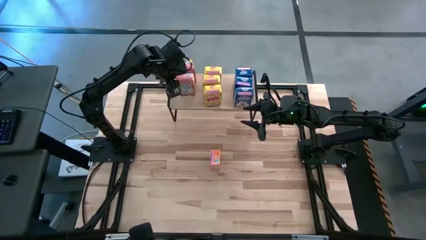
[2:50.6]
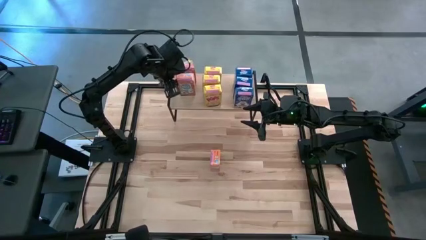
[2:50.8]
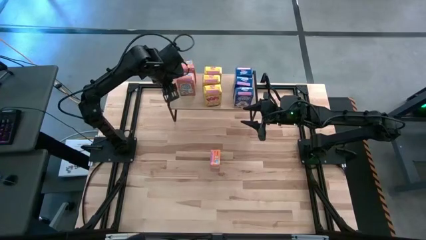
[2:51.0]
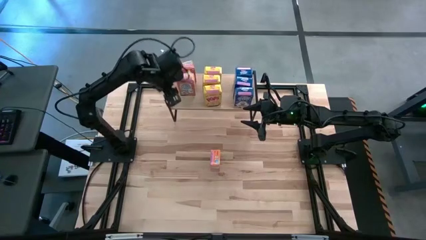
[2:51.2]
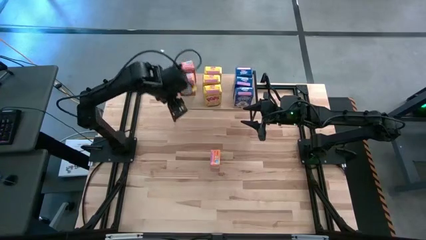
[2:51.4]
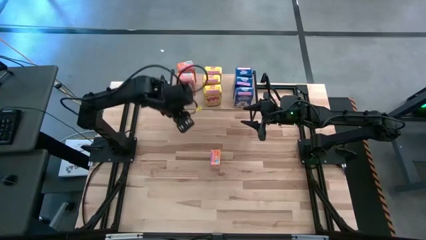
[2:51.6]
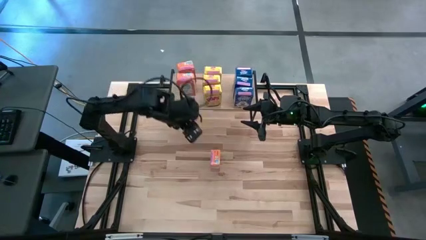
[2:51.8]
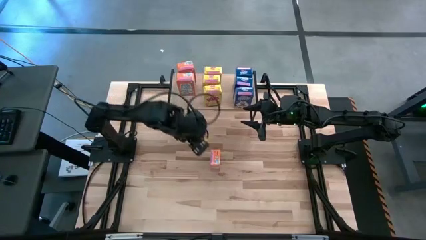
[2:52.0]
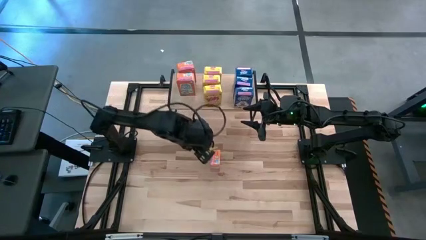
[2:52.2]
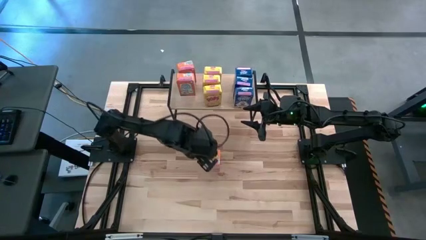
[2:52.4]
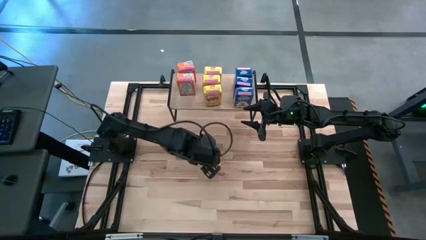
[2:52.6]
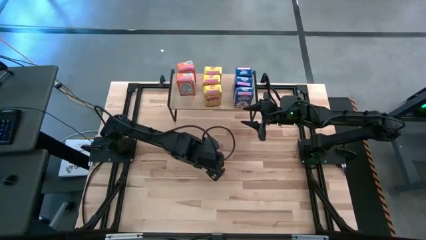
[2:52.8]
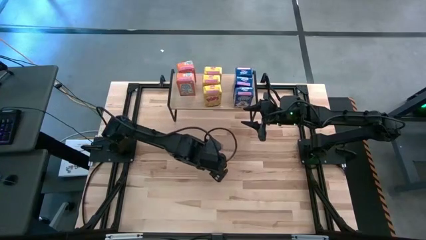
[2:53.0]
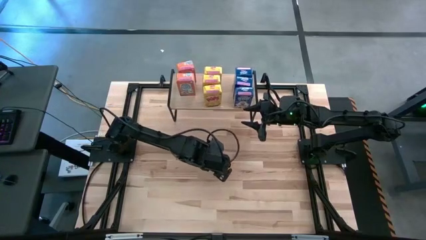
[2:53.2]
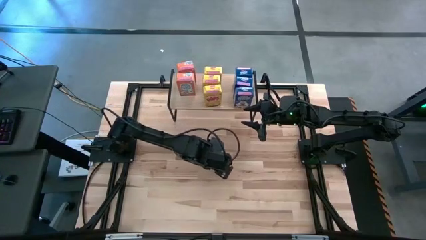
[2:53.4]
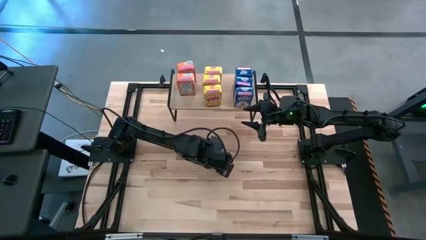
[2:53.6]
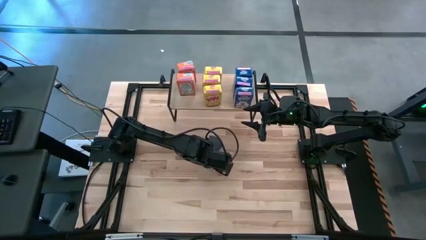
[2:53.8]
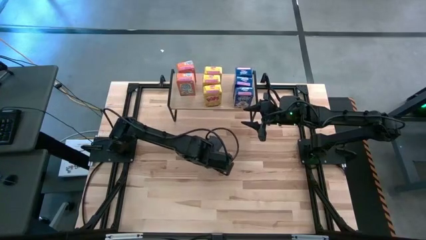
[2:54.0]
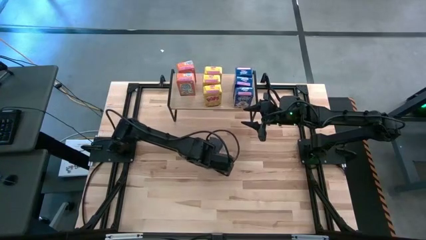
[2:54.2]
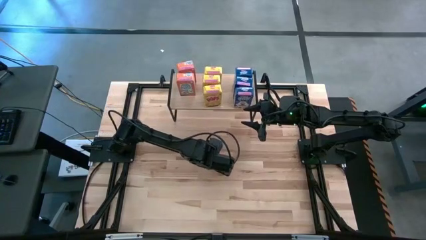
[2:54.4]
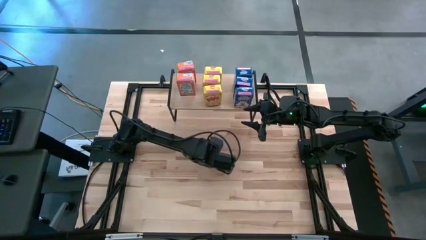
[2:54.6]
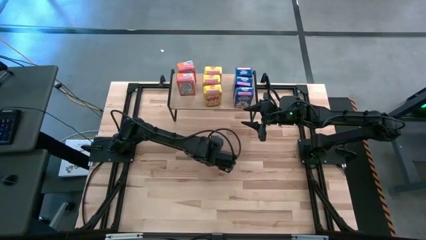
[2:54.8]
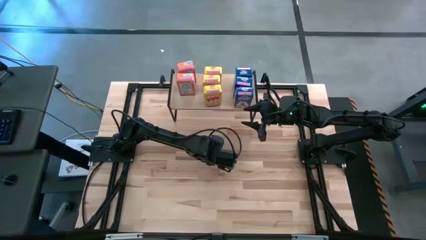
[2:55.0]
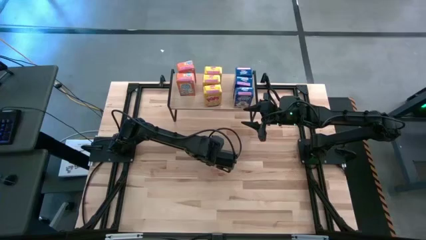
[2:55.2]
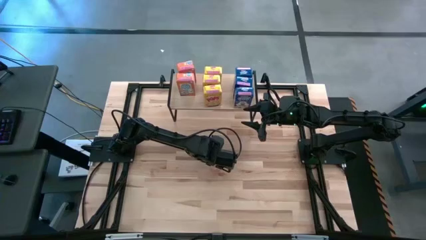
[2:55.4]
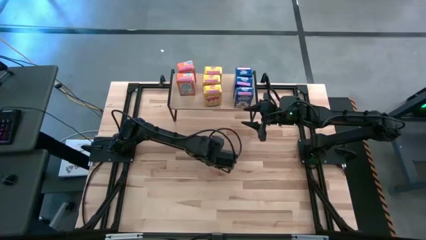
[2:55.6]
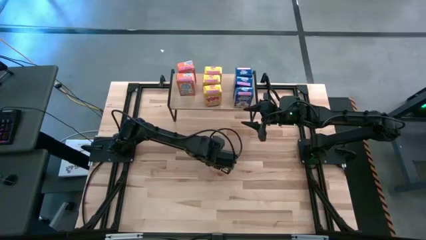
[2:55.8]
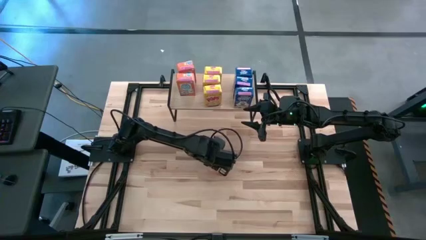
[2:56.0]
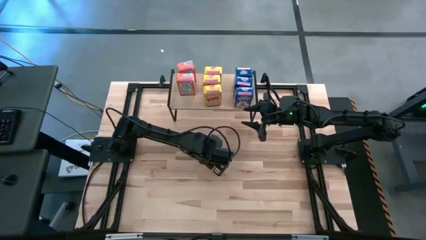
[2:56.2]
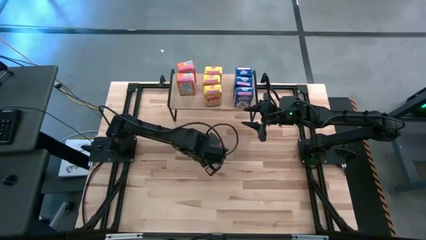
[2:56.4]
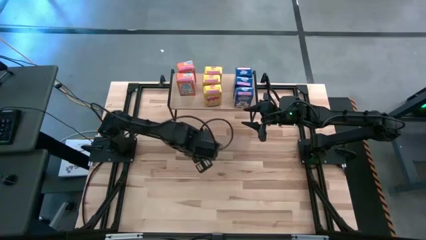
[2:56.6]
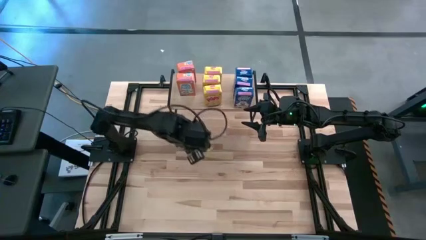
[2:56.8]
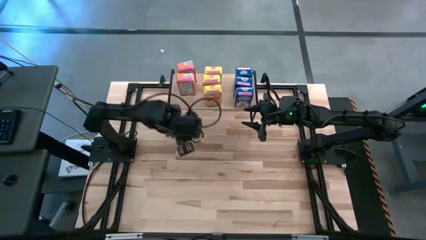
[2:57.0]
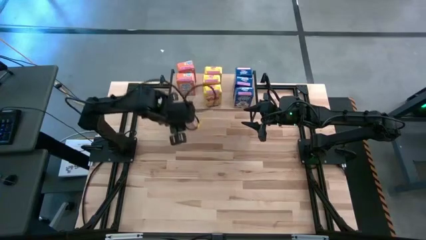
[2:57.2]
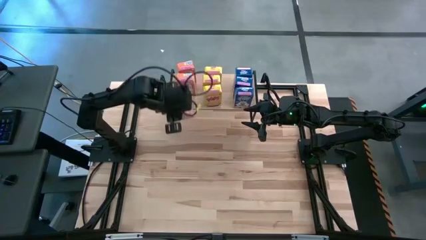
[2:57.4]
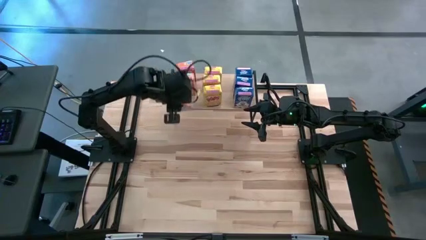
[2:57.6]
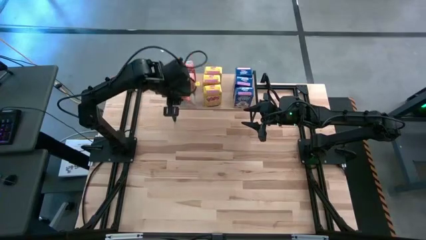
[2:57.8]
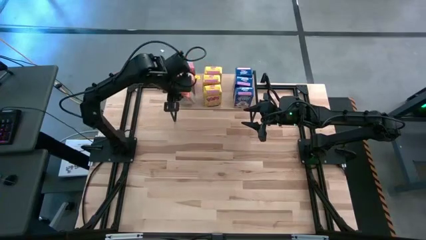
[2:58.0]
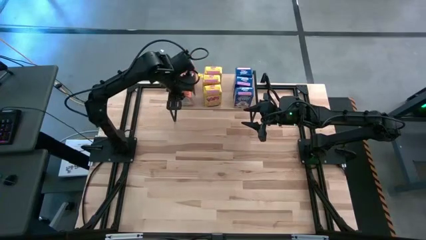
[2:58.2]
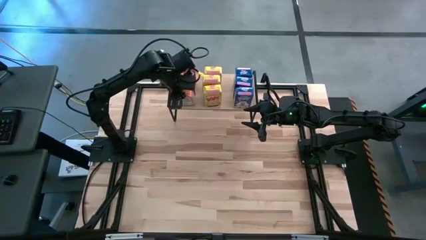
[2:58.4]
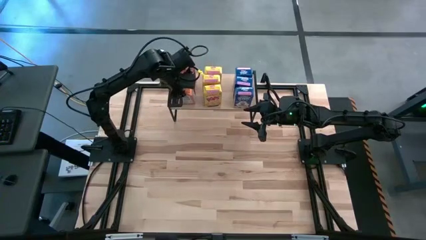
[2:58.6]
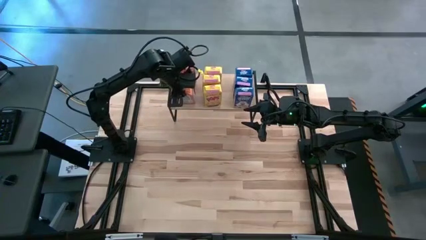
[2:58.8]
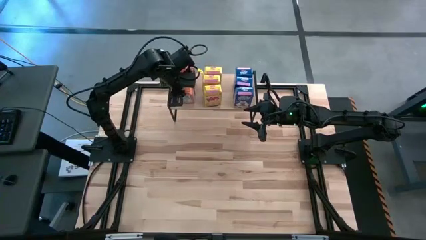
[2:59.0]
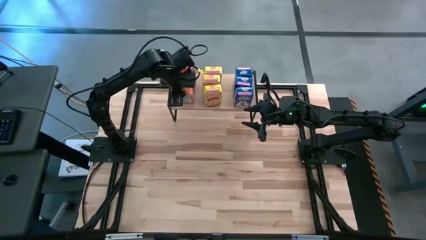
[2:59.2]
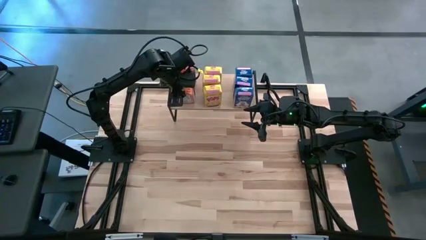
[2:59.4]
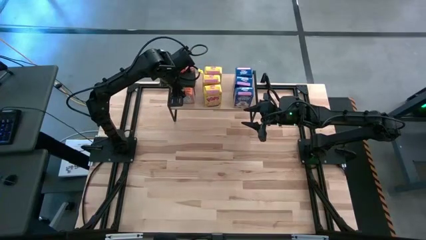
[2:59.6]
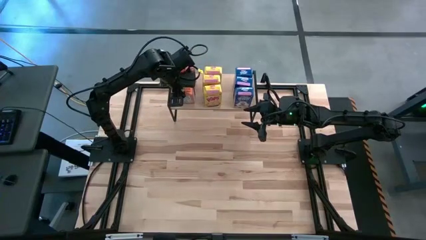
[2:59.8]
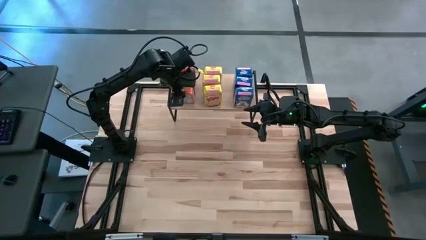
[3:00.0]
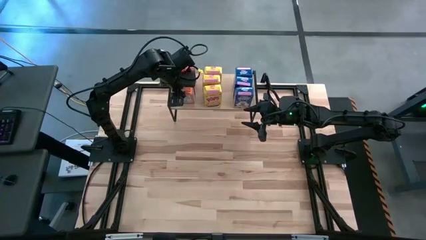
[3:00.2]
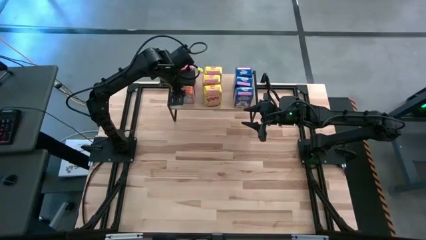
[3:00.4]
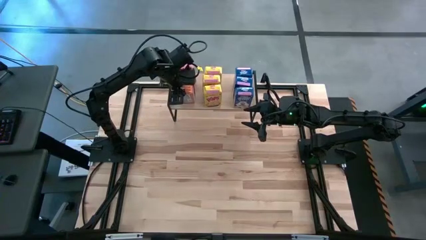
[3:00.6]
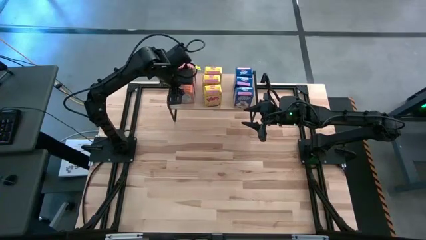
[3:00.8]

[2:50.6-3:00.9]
Task: Stack cereal on shelf
Put the orange cereal box on the shelf aligned with the other orange cereal boxes
